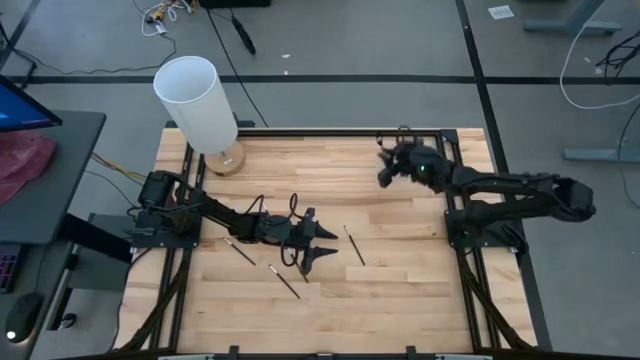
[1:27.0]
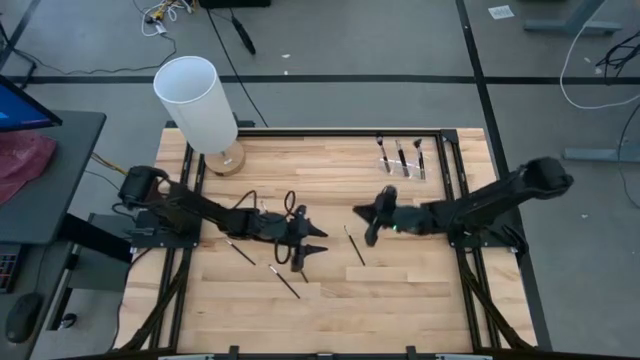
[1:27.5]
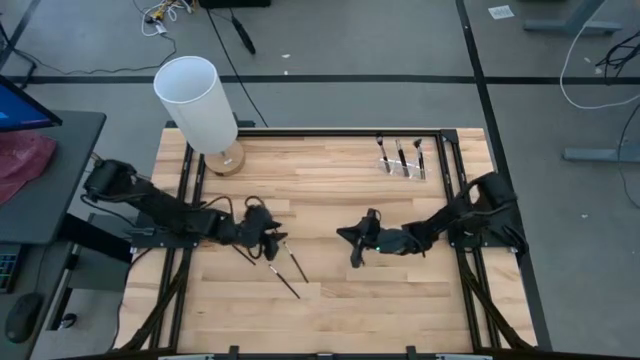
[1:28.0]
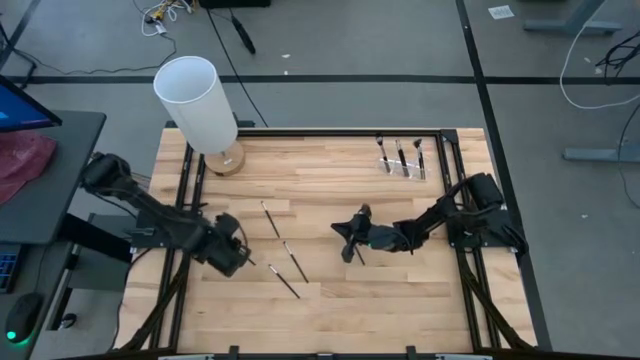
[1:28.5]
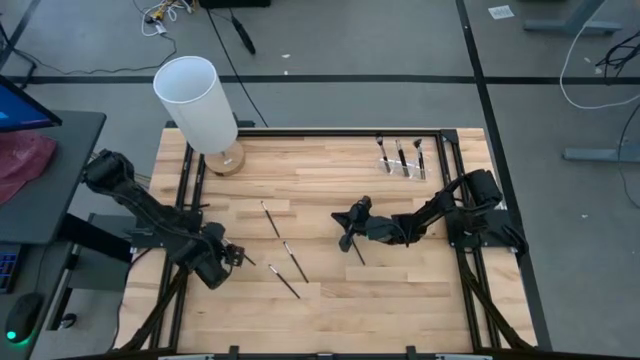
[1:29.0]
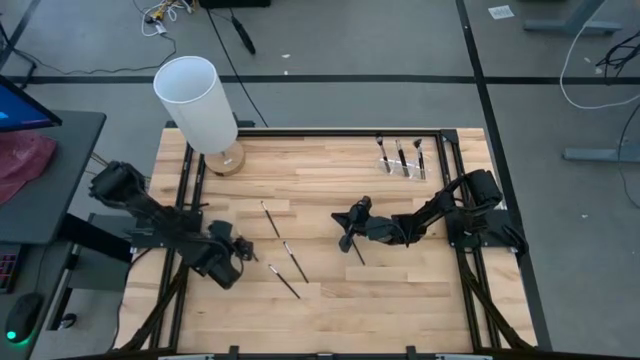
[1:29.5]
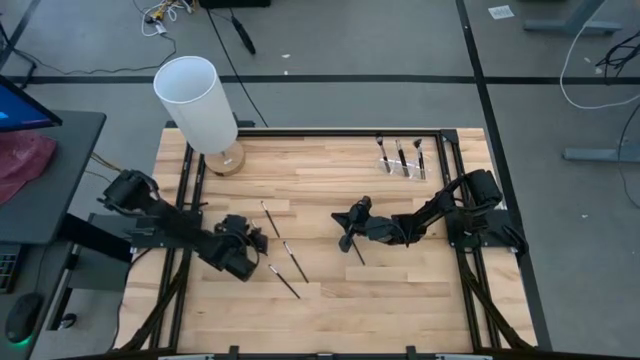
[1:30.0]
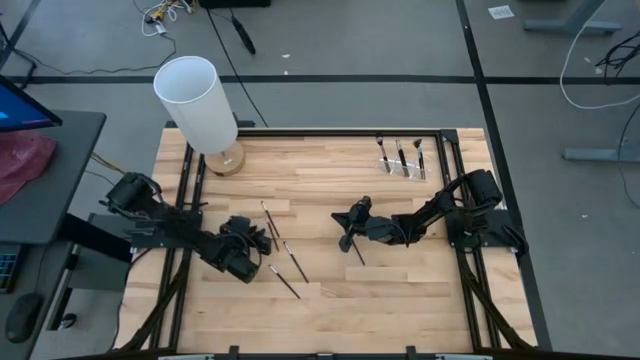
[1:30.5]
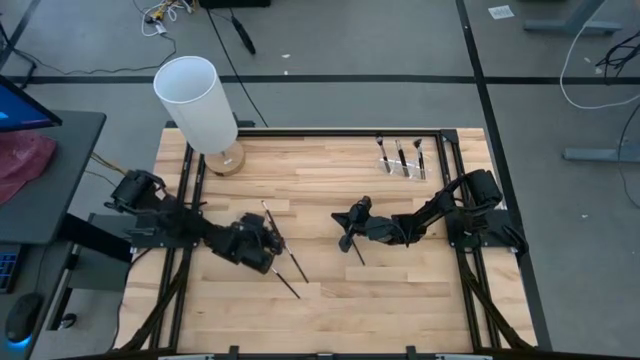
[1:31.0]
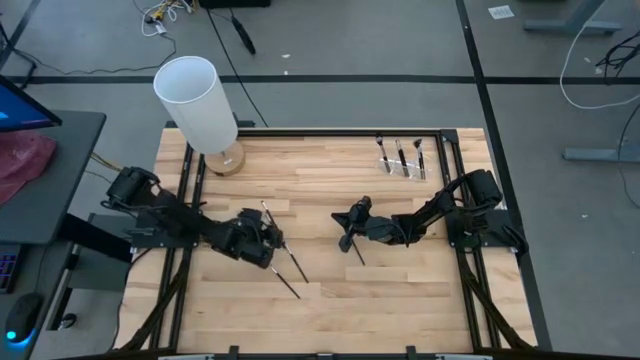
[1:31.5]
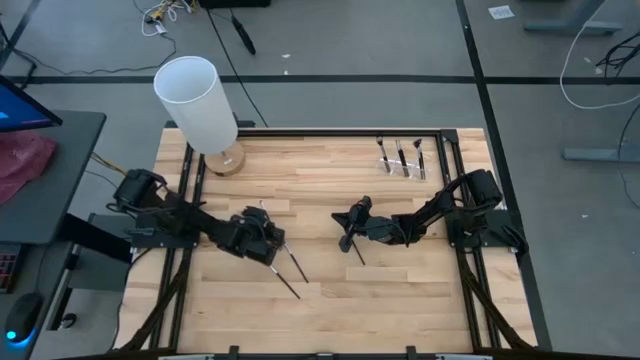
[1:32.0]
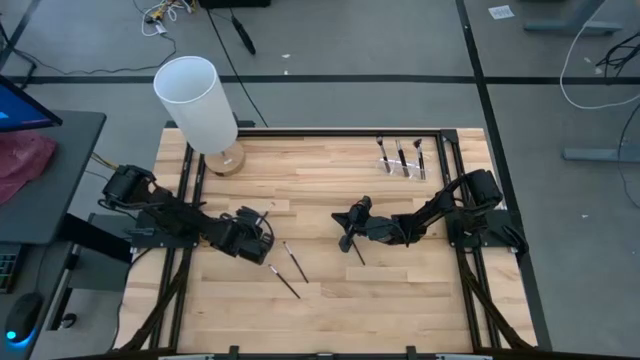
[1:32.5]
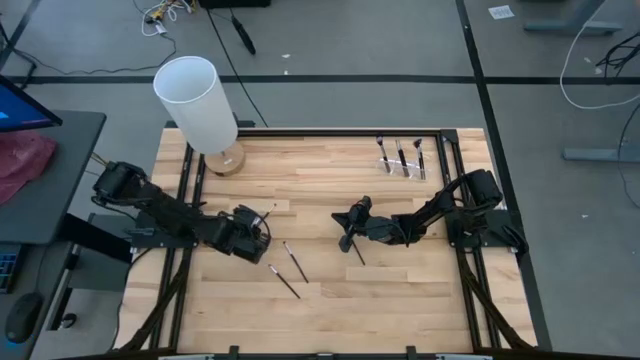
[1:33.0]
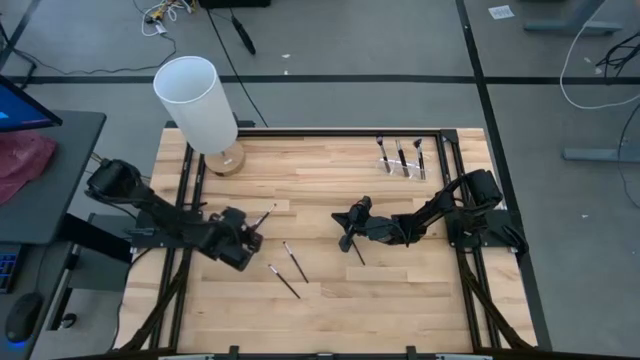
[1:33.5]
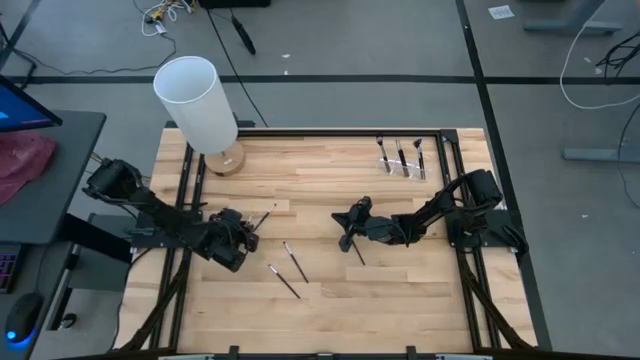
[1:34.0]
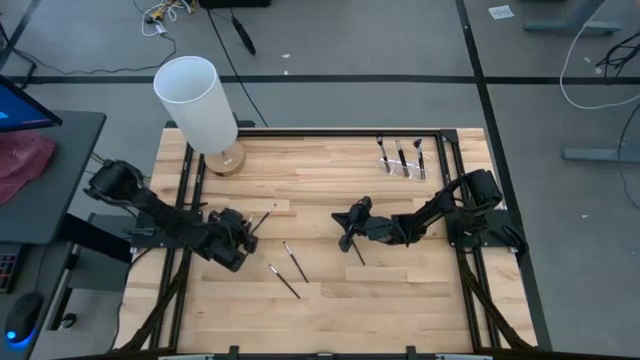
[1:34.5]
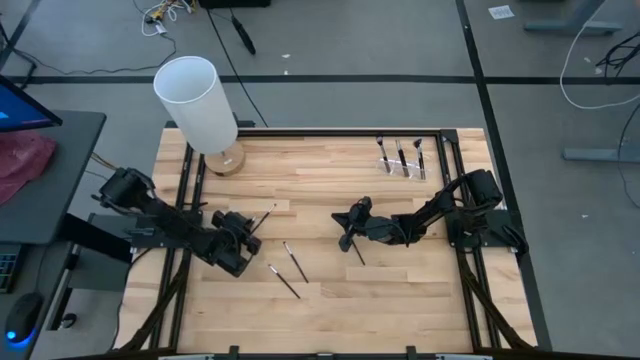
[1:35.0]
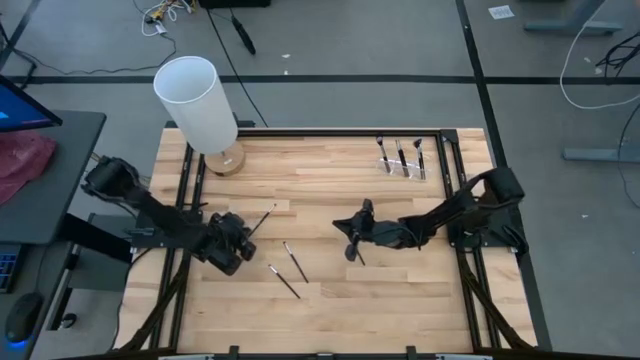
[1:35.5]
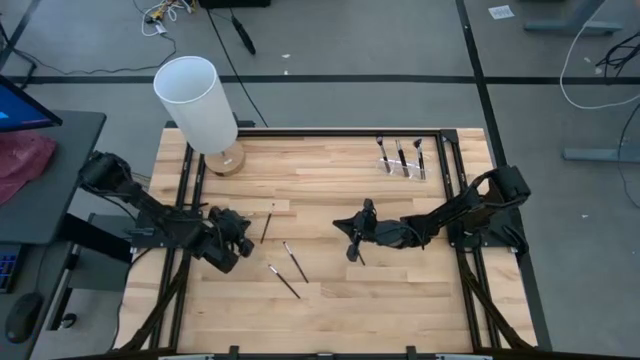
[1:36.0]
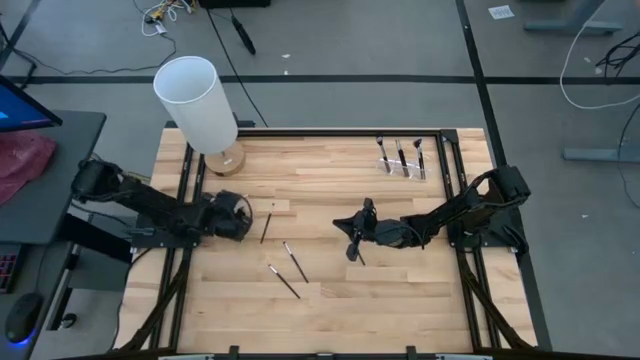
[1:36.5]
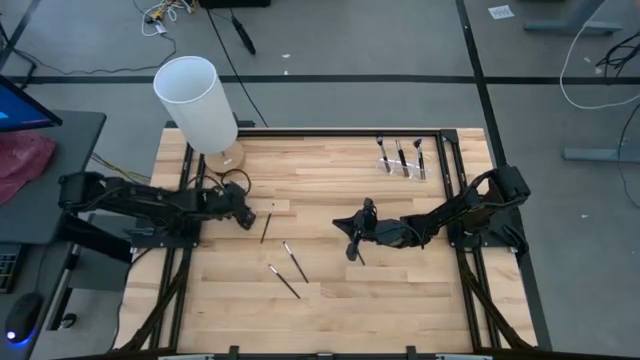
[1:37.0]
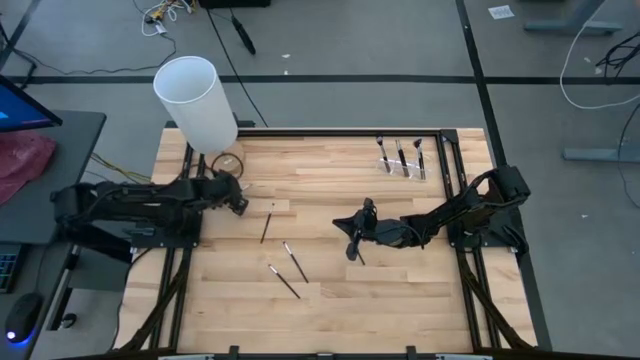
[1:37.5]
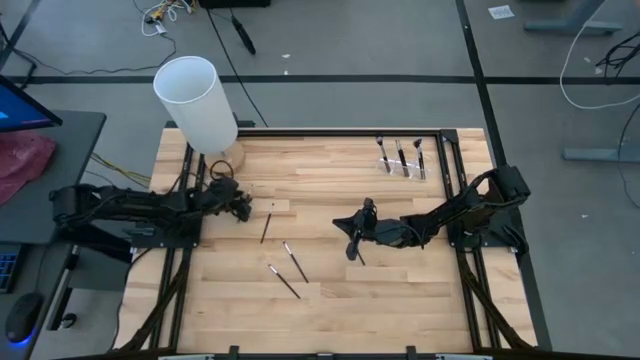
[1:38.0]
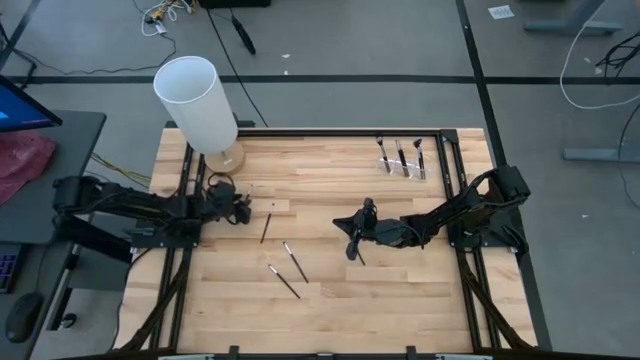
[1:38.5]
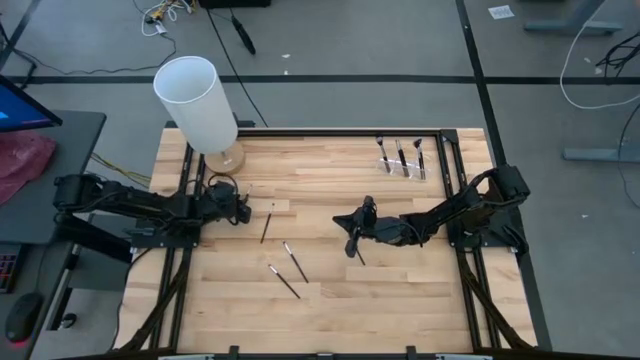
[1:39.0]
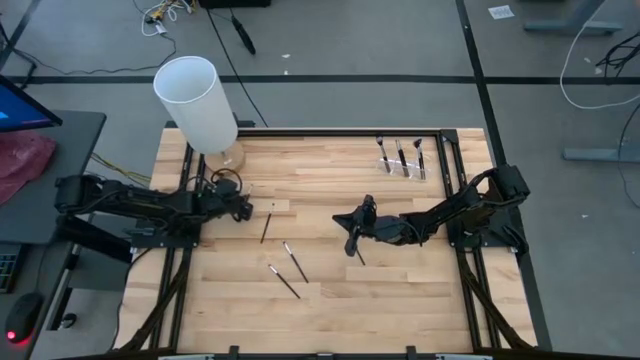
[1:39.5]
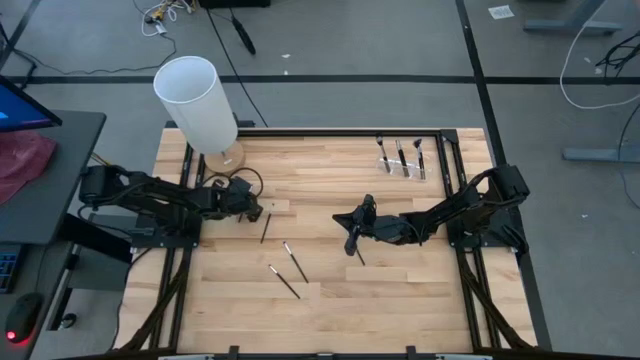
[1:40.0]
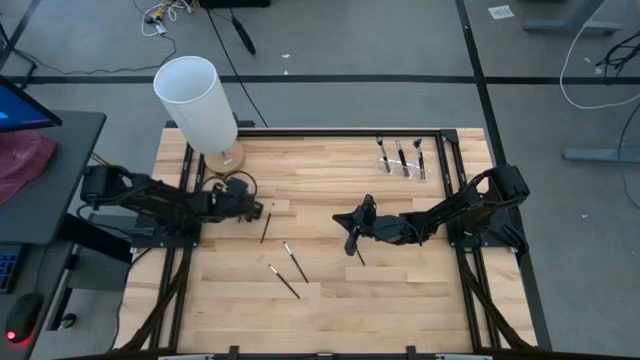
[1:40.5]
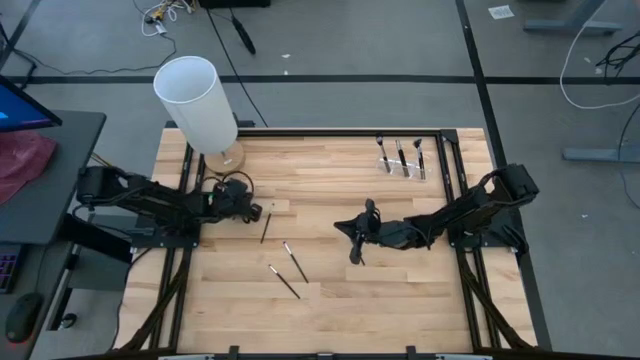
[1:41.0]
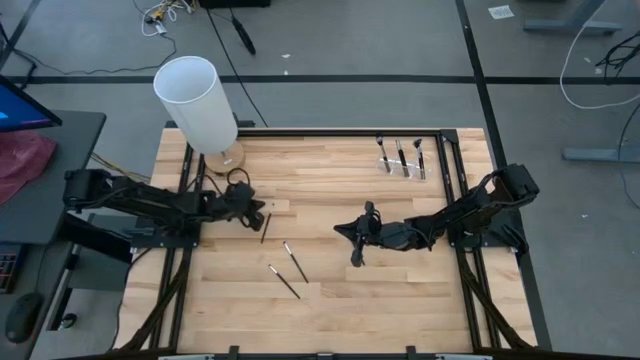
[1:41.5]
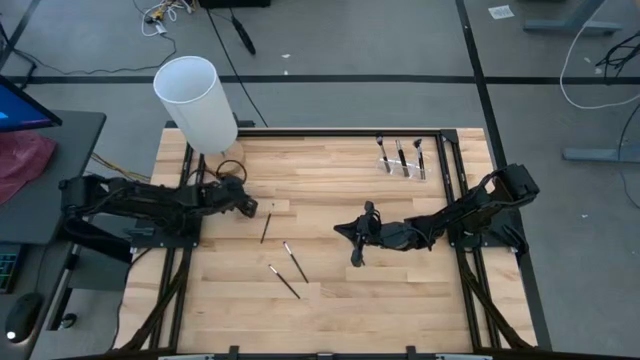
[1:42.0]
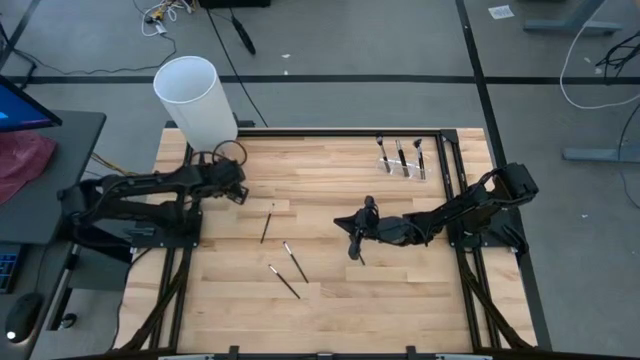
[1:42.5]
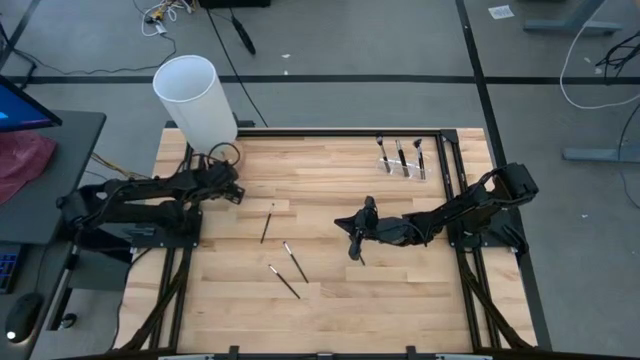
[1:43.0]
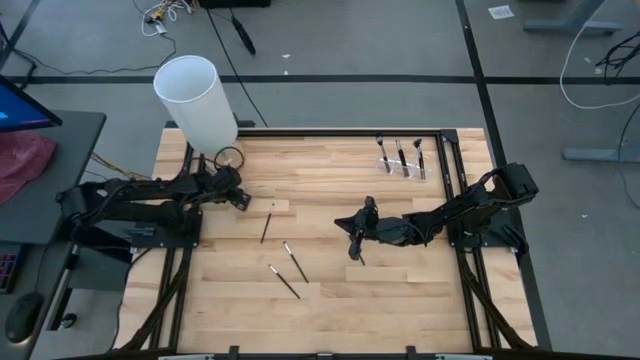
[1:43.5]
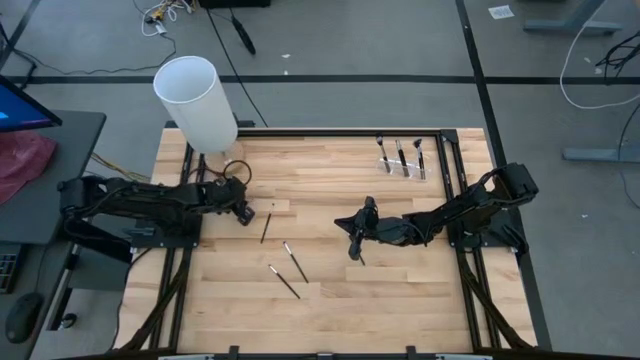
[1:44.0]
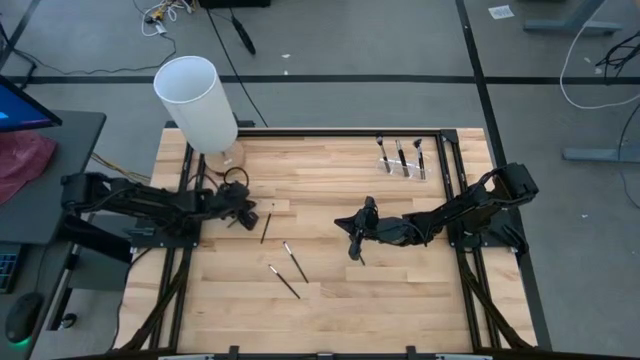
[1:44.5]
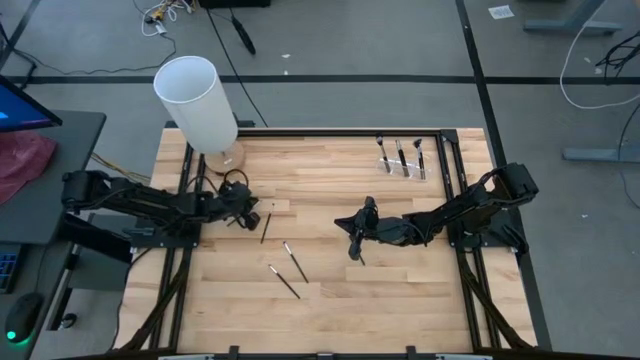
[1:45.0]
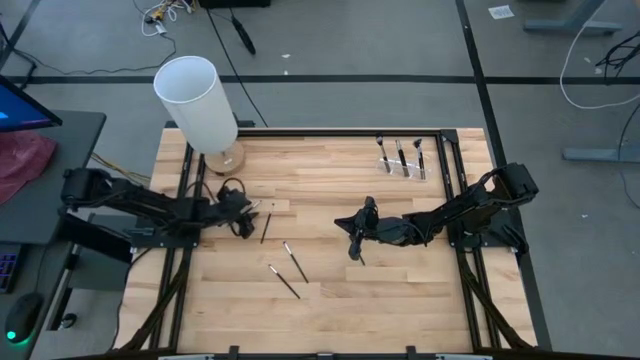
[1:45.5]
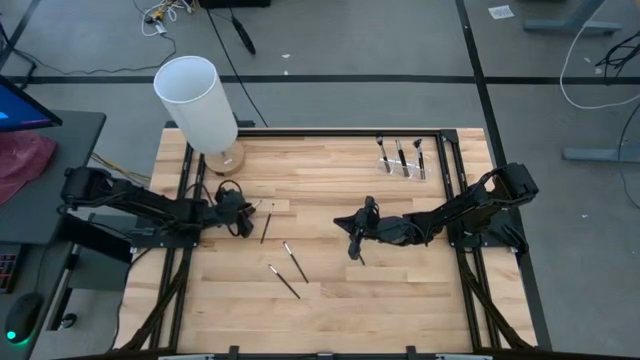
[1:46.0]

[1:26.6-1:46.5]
Task: Put items in baskets/containers
Put the eyeshadow brush into the transparent organizer

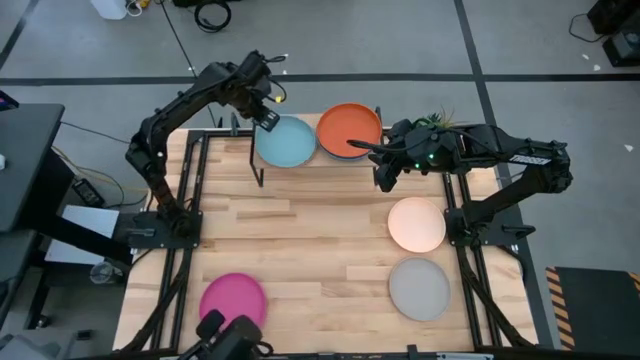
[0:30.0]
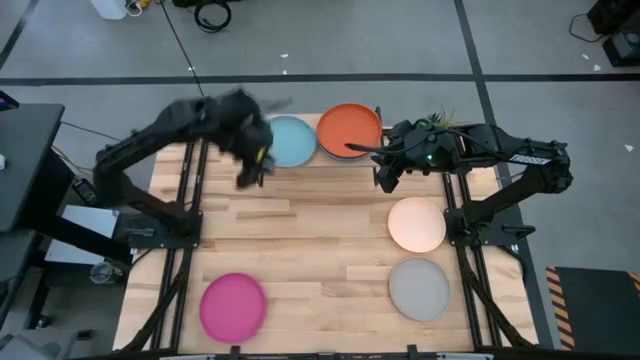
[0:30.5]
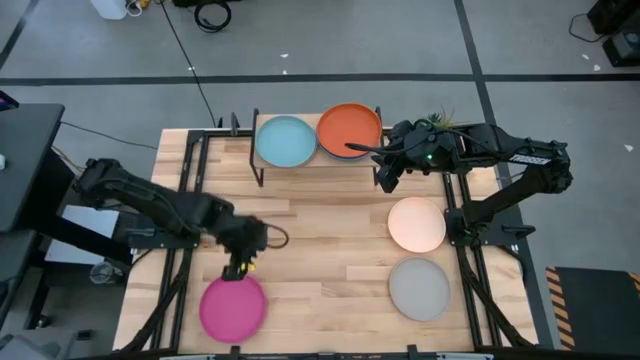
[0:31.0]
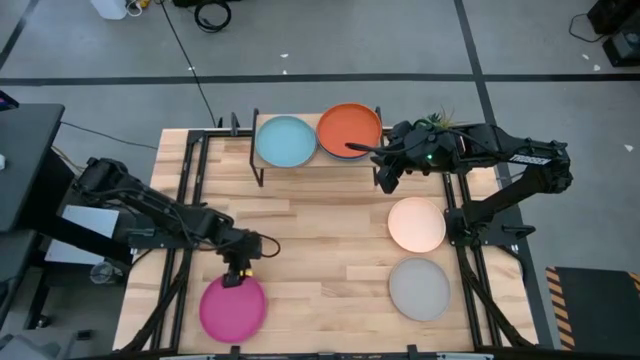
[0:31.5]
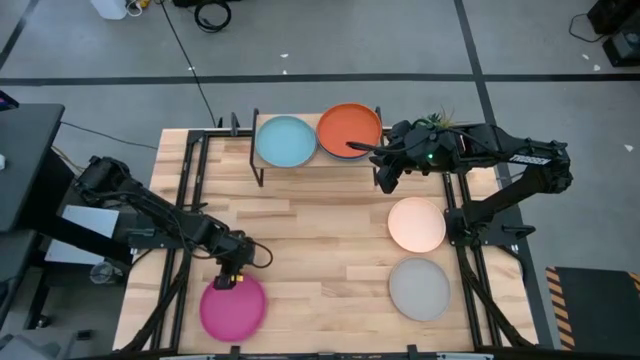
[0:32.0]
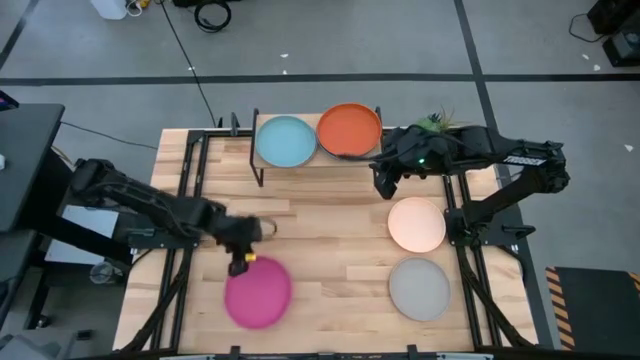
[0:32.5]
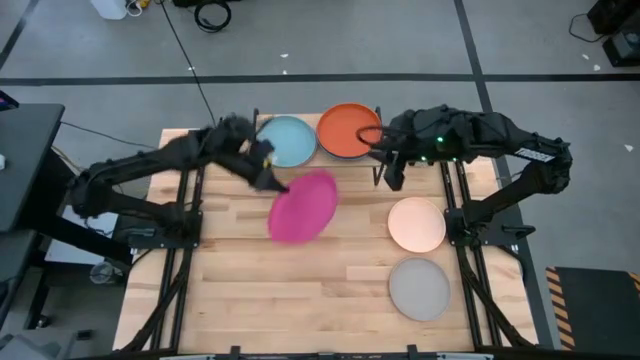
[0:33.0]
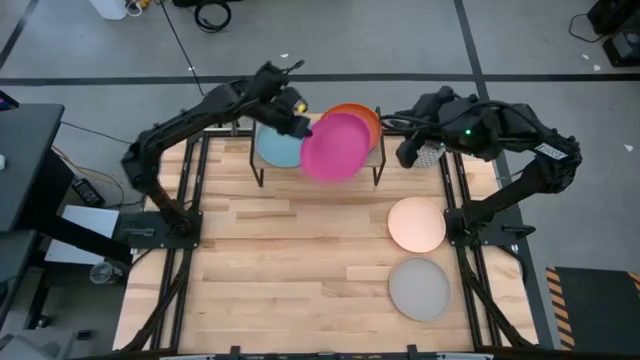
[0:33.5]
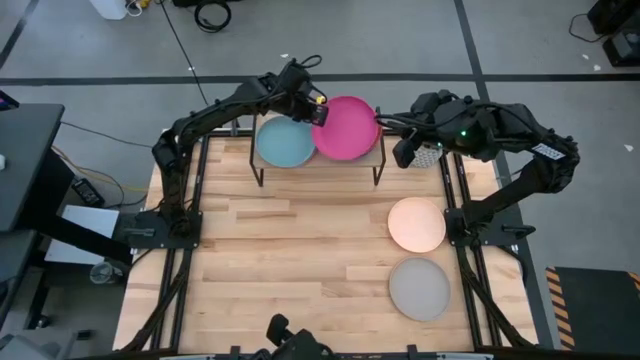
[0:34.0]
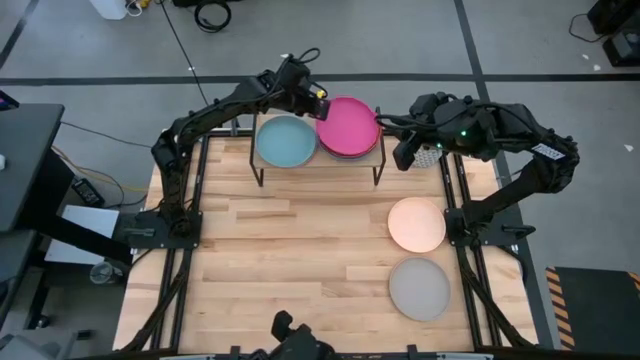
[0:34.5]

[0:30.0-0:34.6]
Task: Place and stack plates onto a shelf
Stack the pink plate into the orange plate on the shelf
